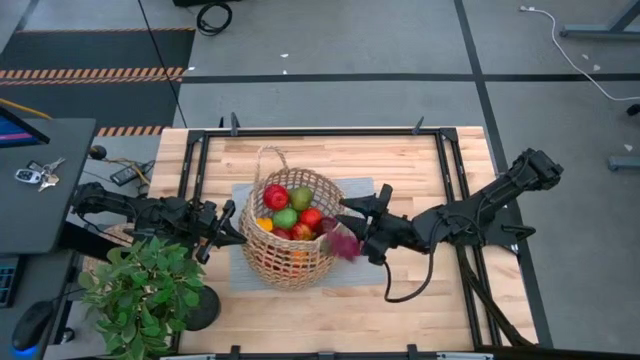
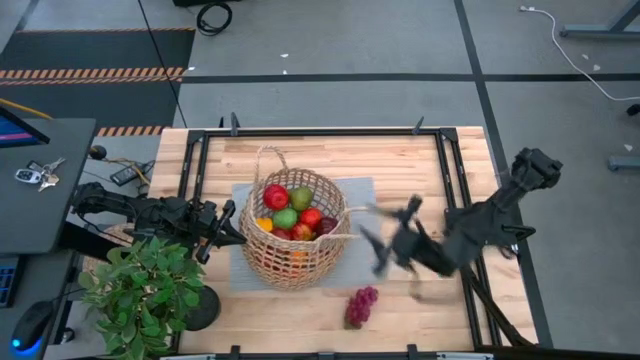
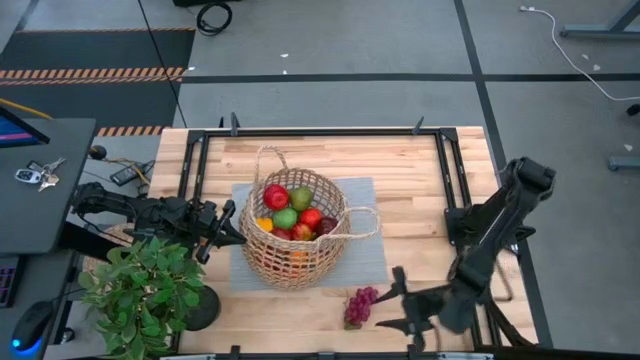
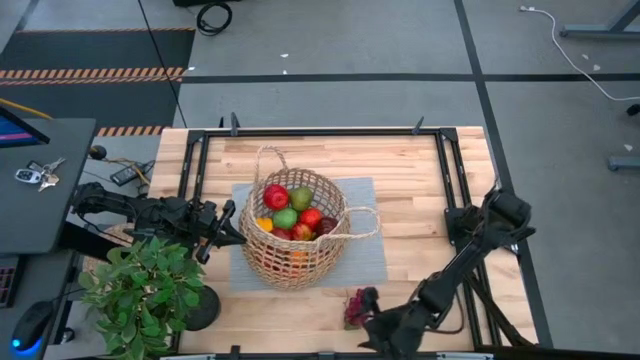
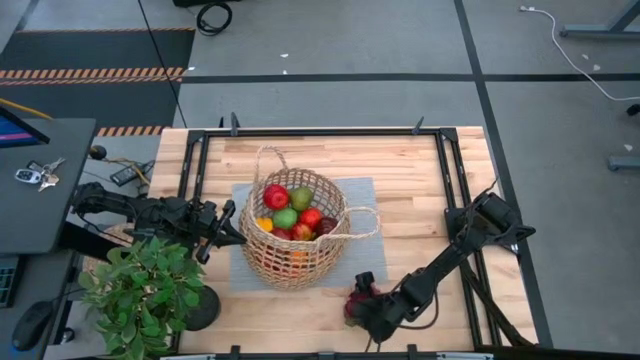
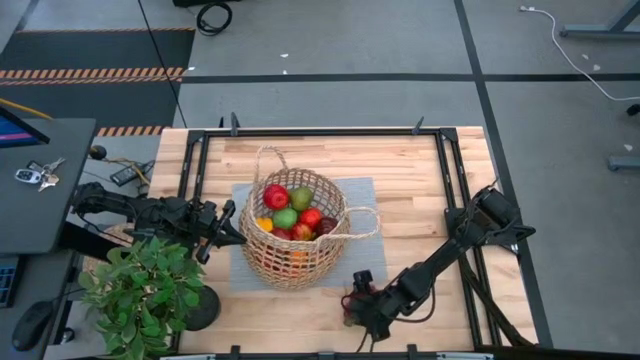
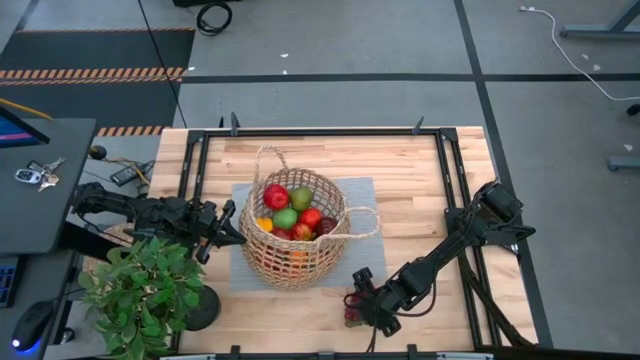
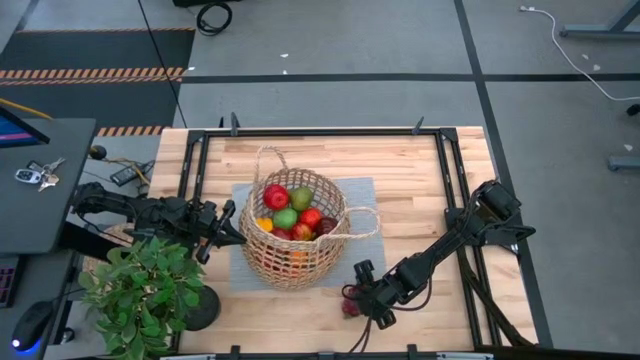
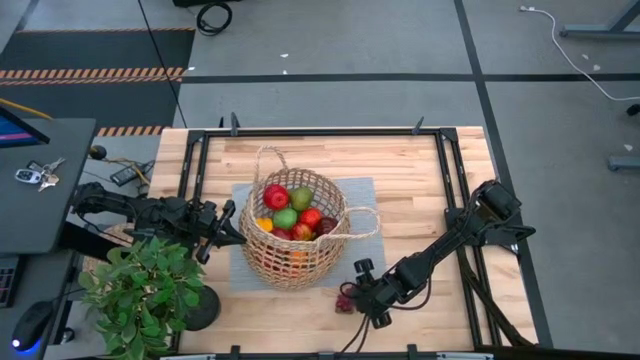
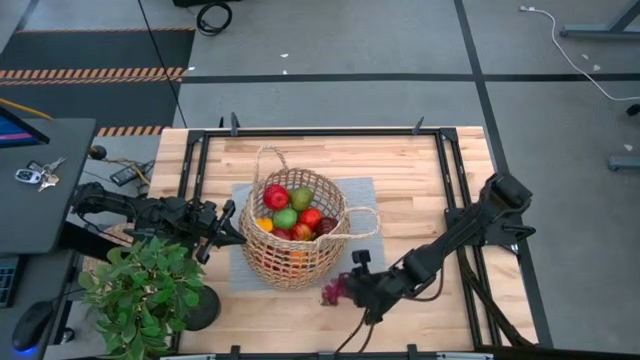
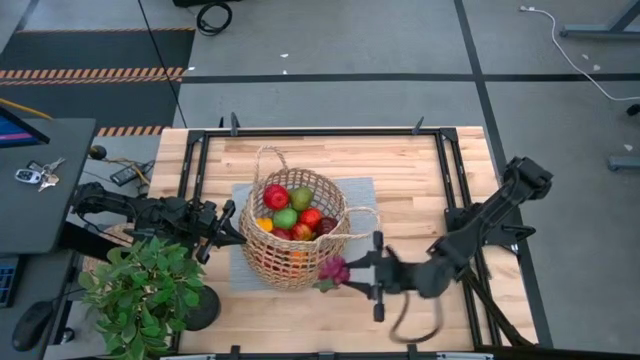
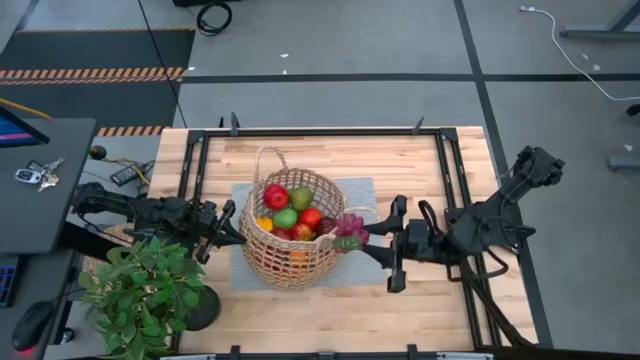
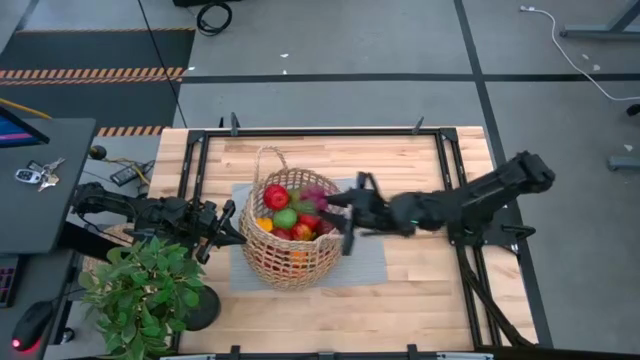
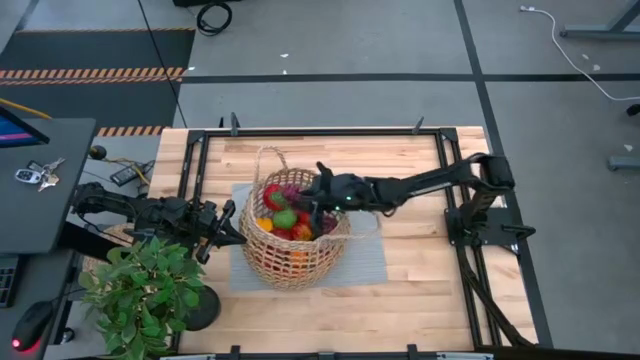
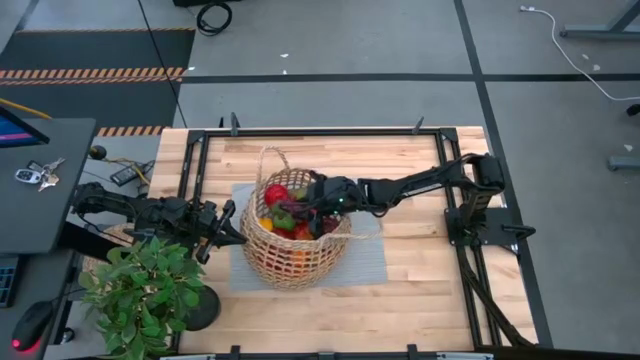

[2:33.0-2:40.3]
Task: Build produce basket
Put the purple grapes into the basket

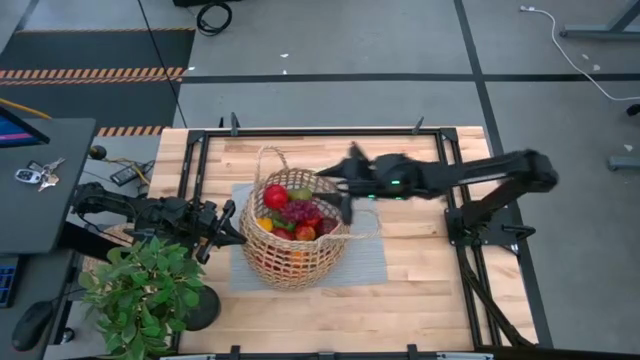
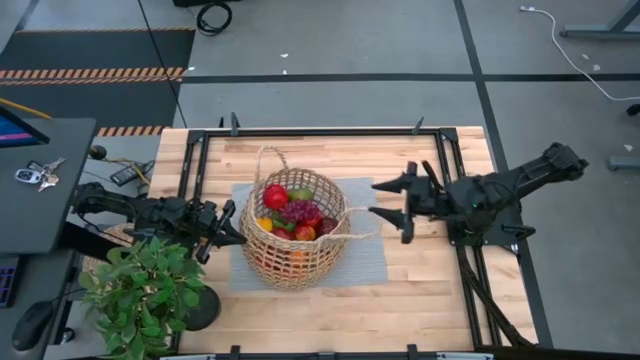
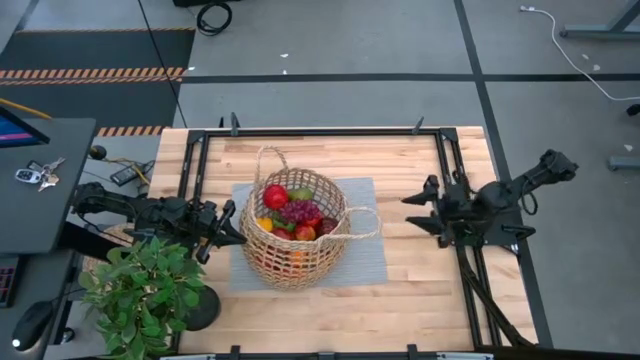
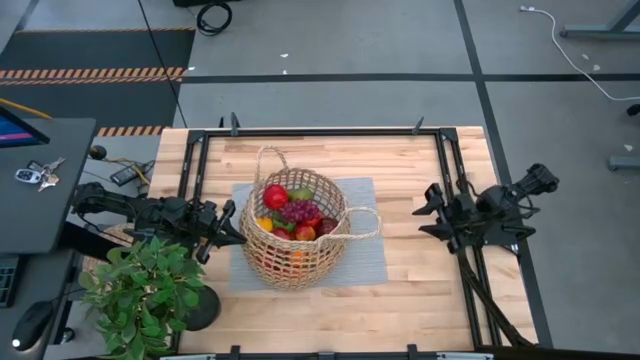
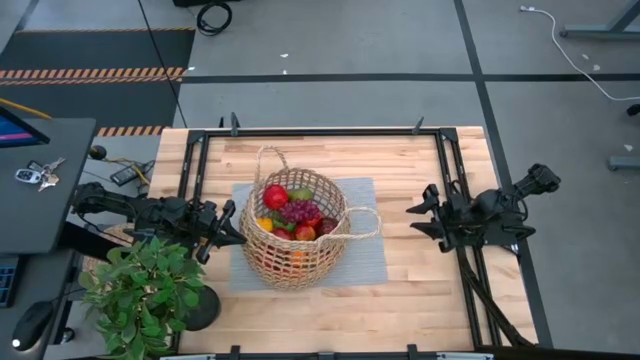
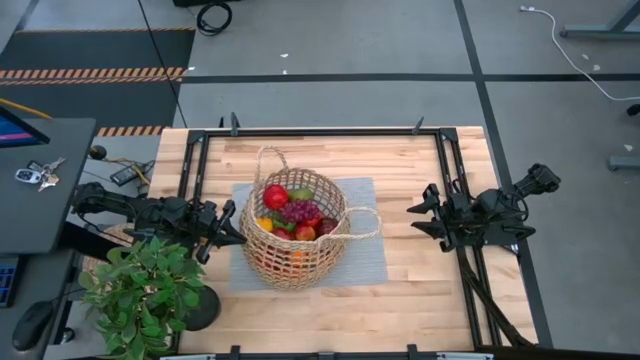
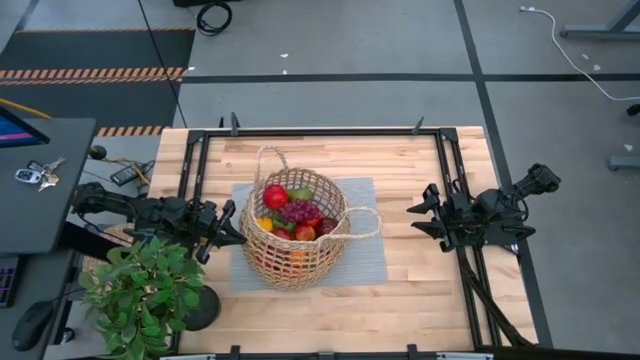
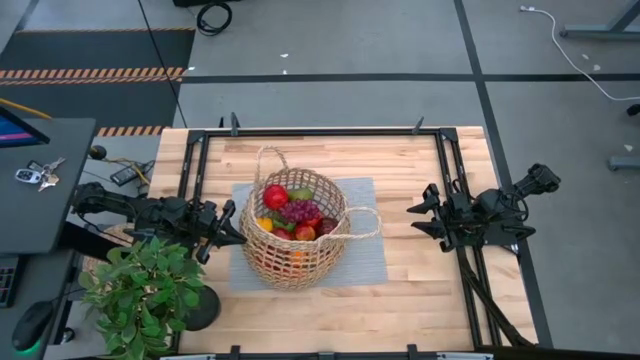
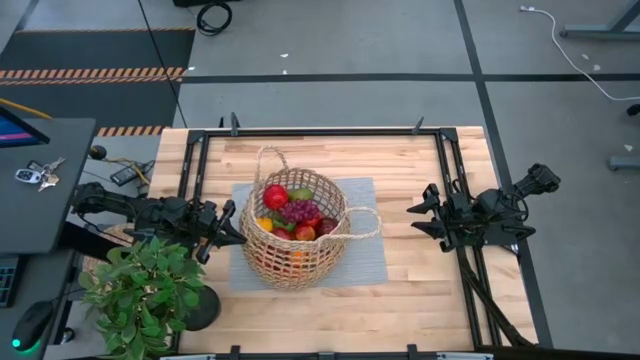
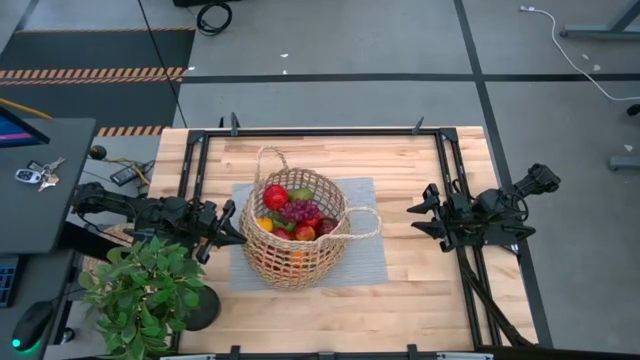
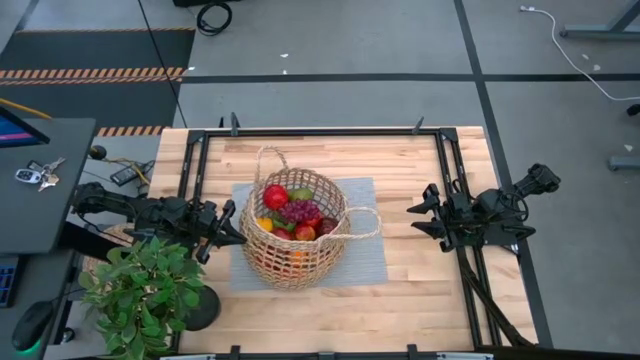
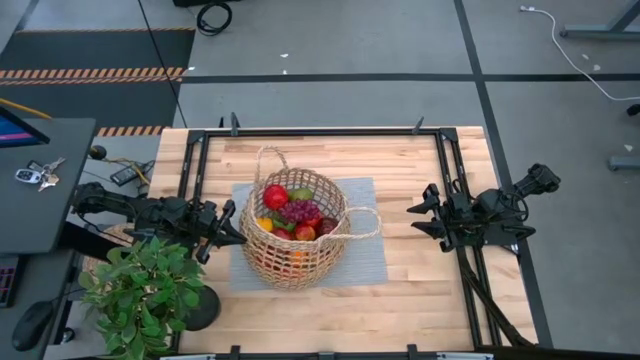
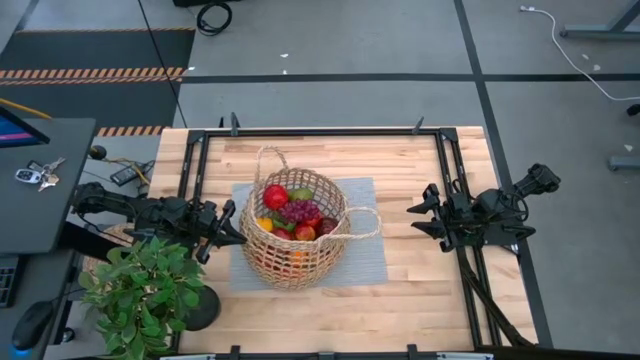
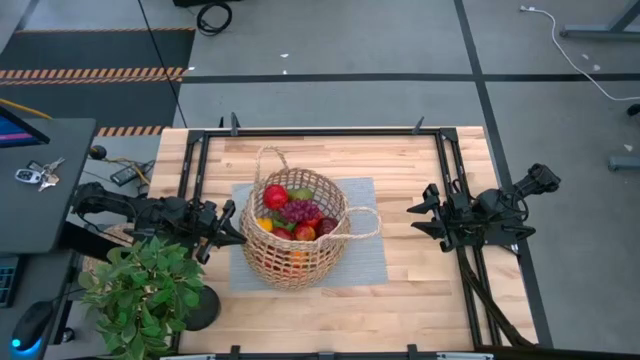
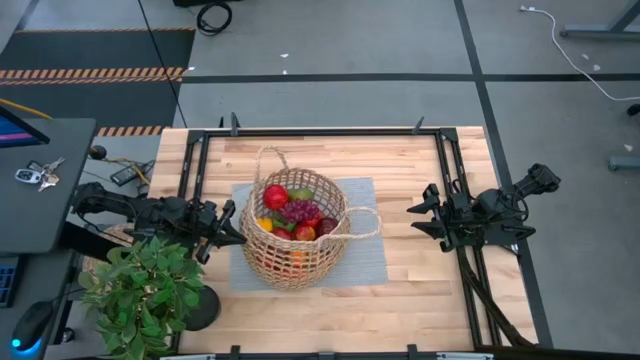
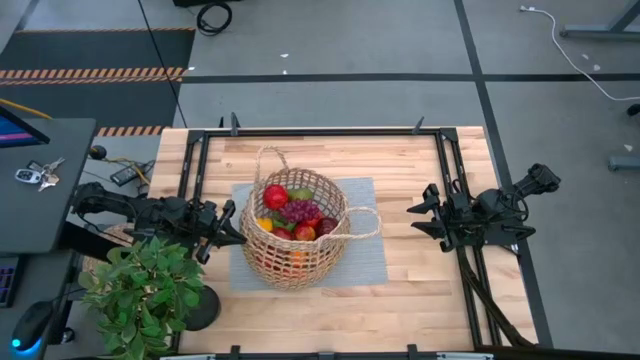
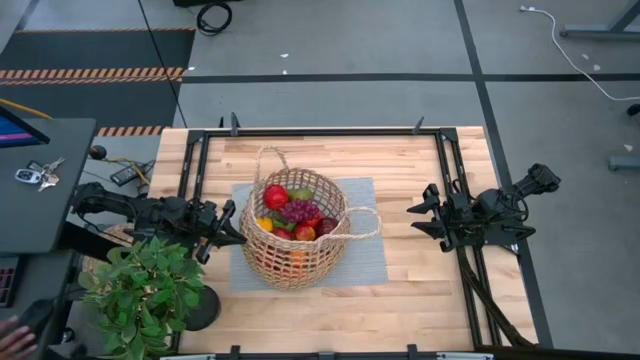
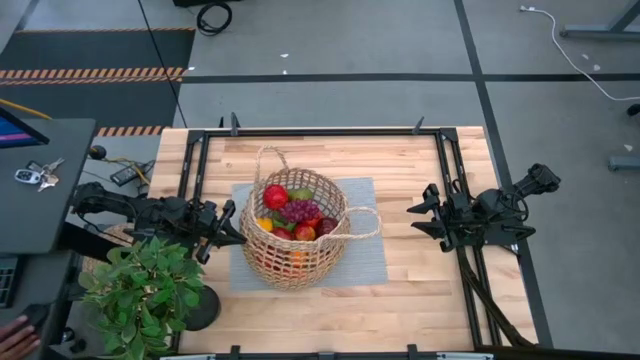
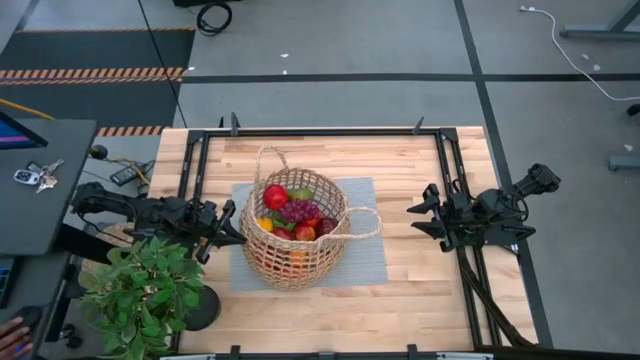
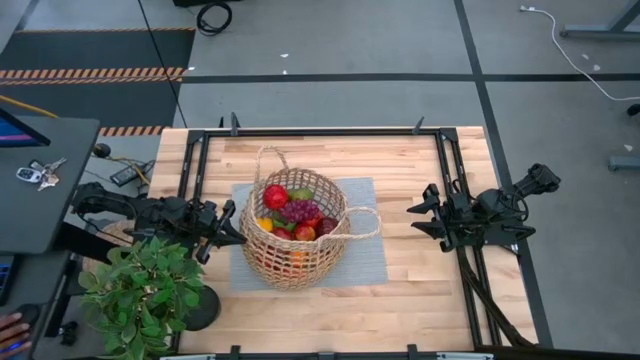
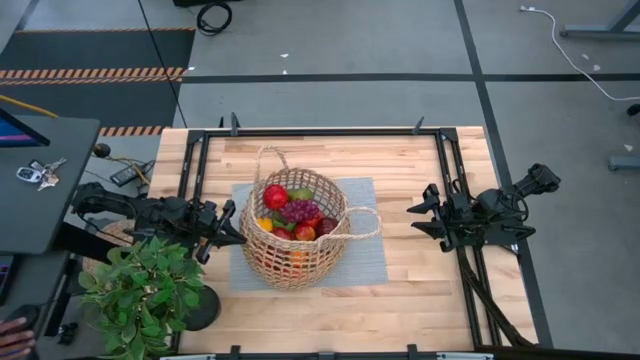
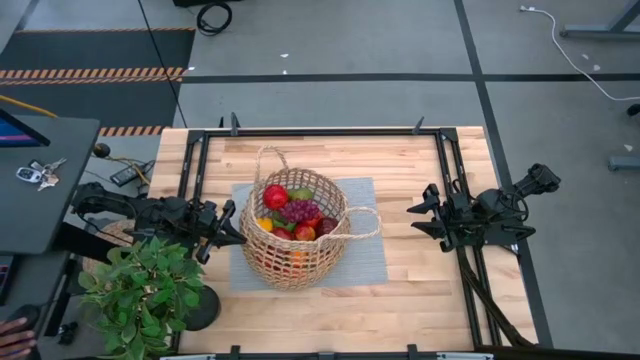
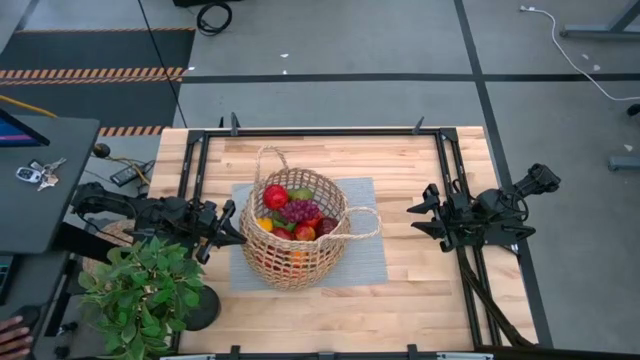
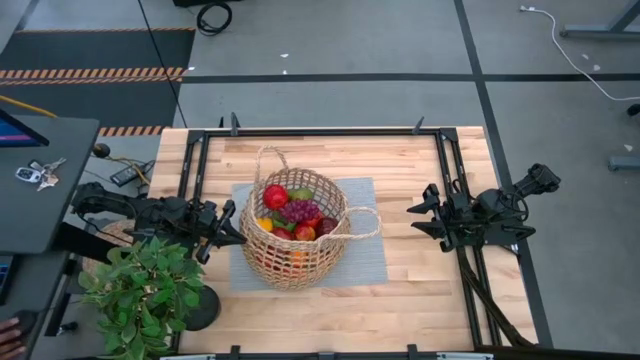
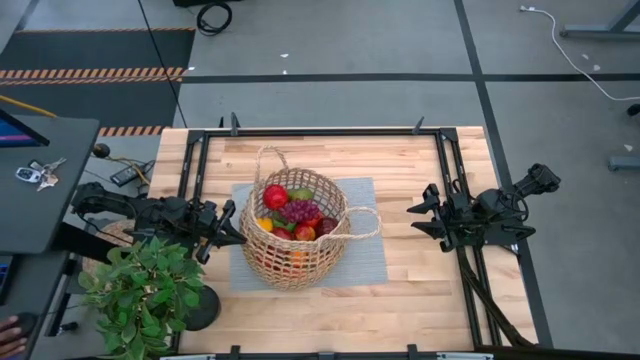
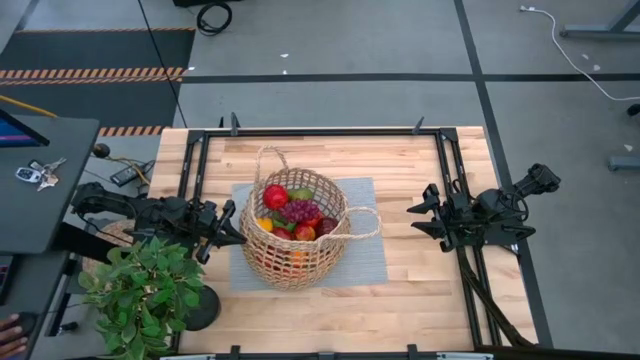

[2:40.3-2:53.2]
Return to Home Position
